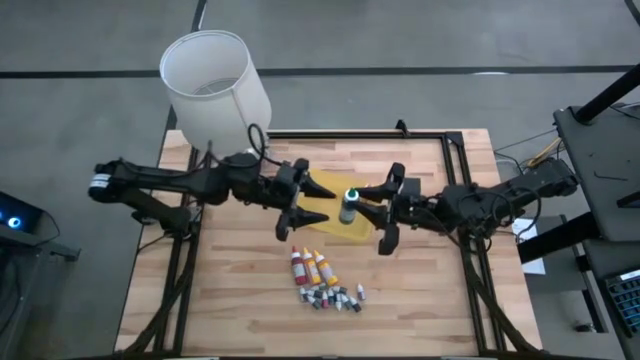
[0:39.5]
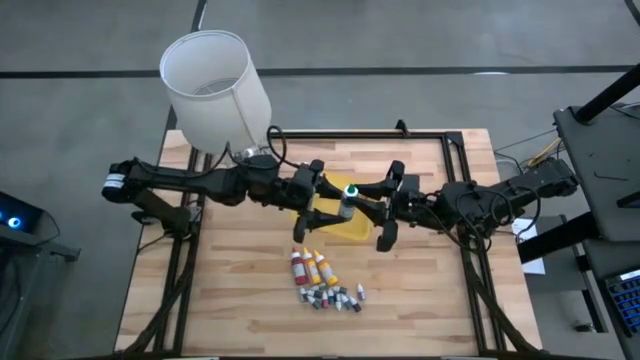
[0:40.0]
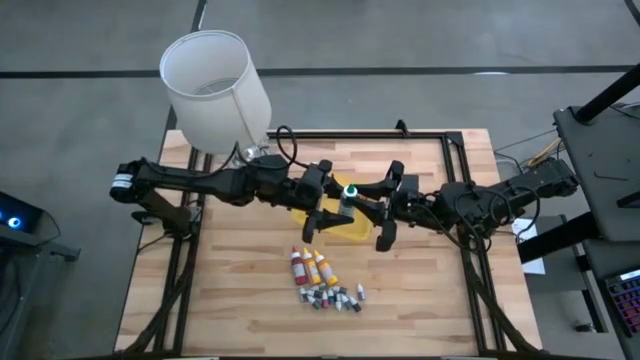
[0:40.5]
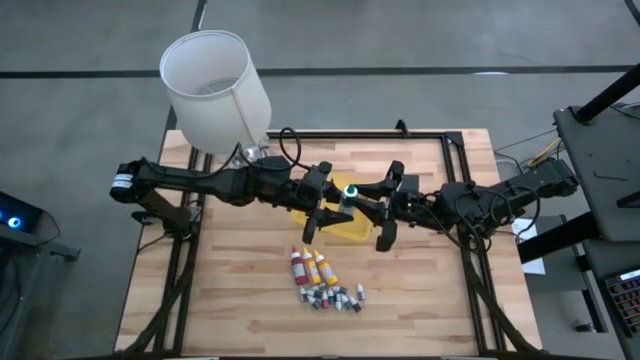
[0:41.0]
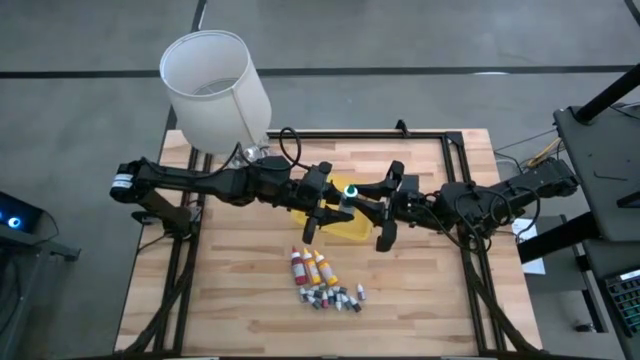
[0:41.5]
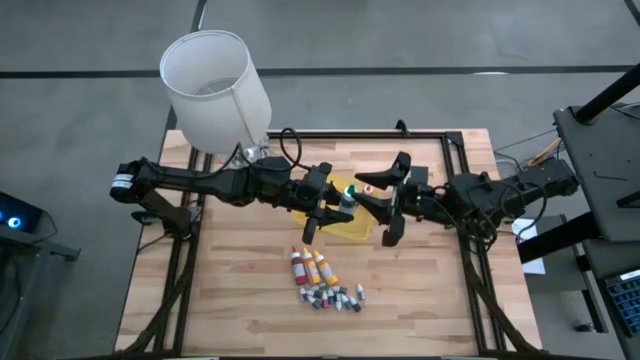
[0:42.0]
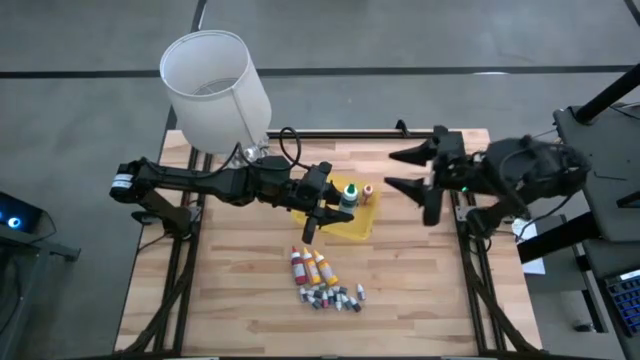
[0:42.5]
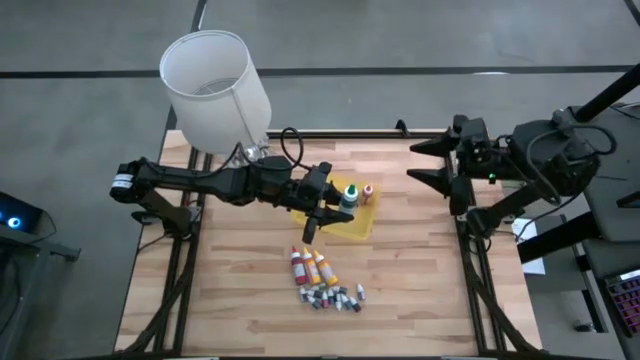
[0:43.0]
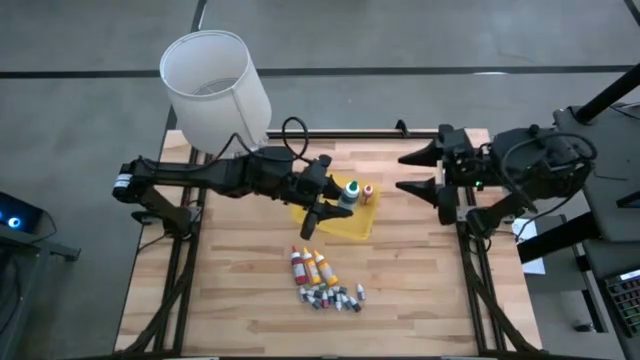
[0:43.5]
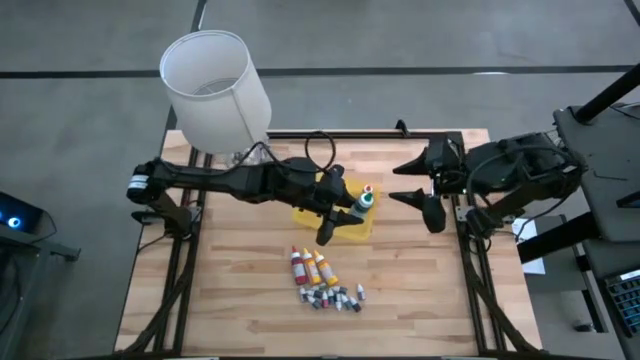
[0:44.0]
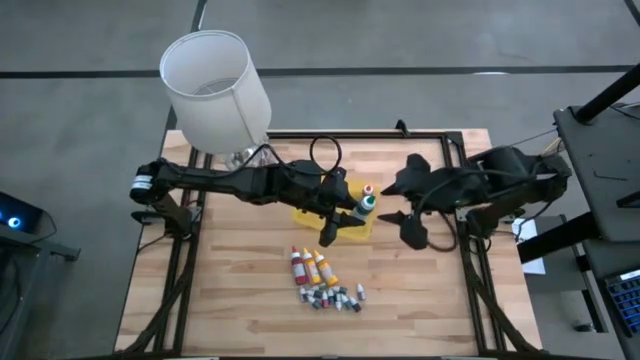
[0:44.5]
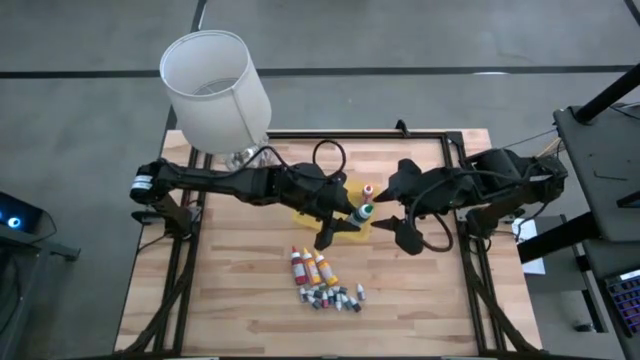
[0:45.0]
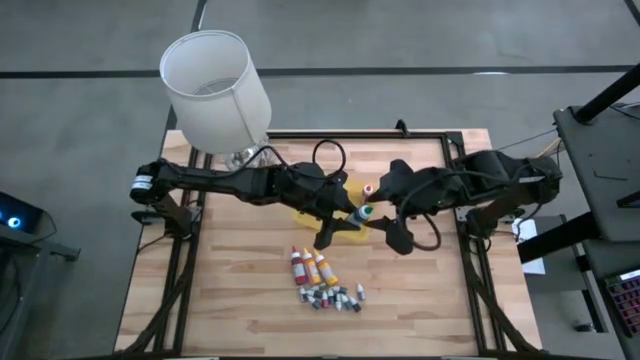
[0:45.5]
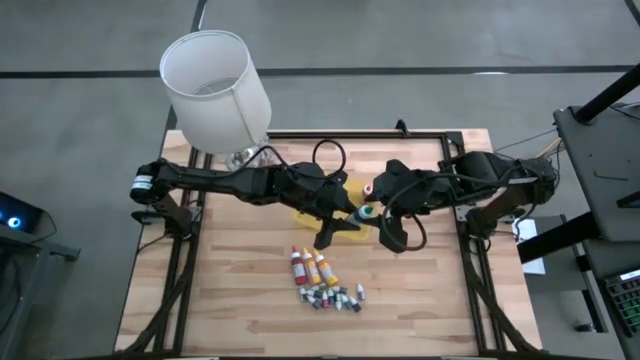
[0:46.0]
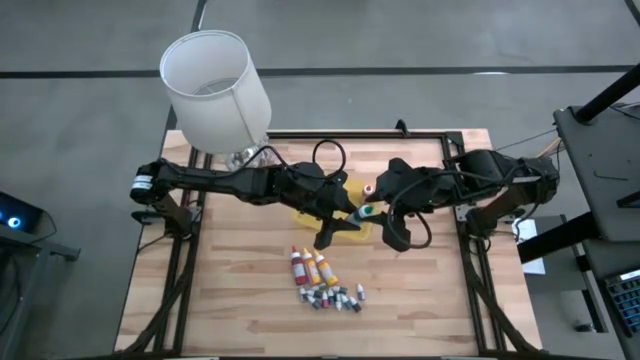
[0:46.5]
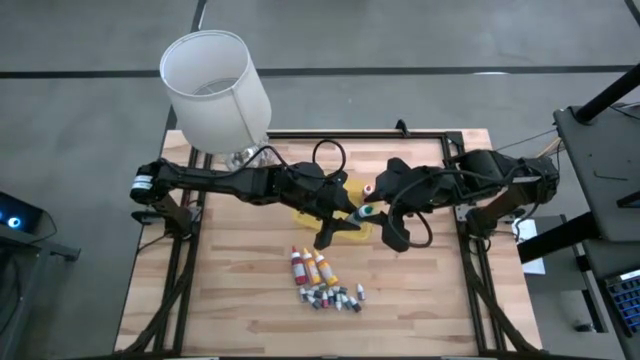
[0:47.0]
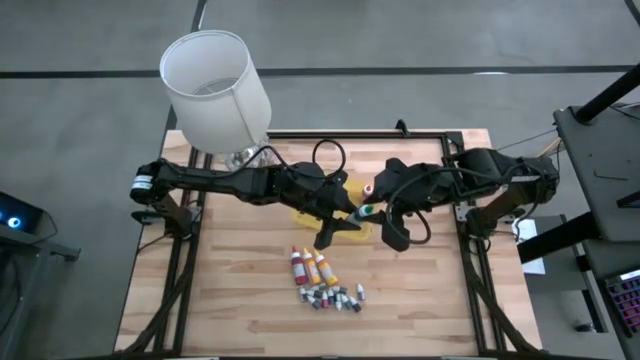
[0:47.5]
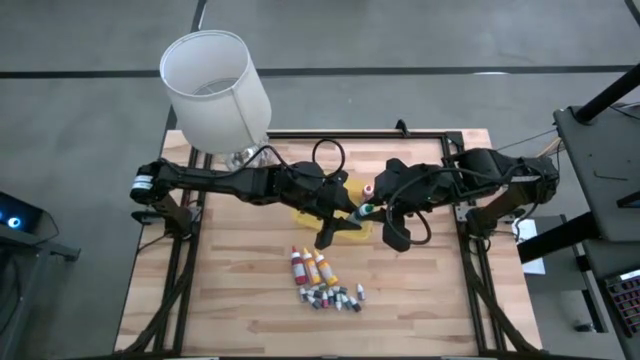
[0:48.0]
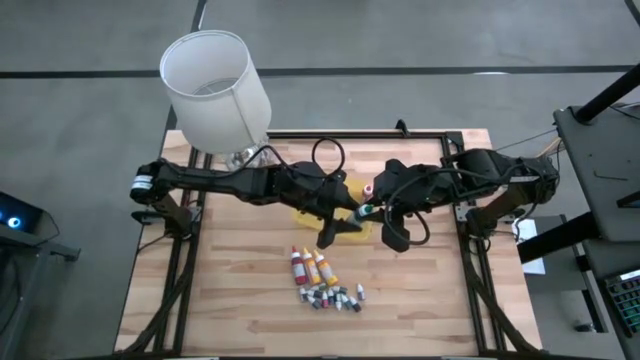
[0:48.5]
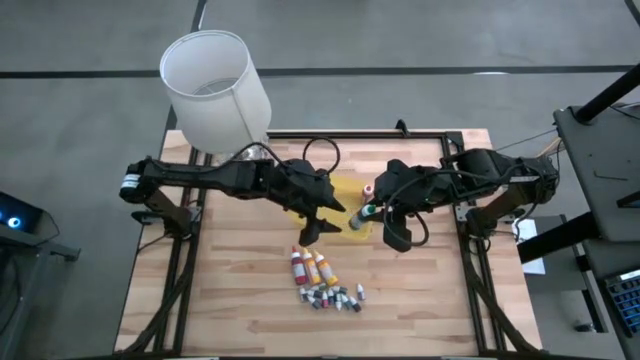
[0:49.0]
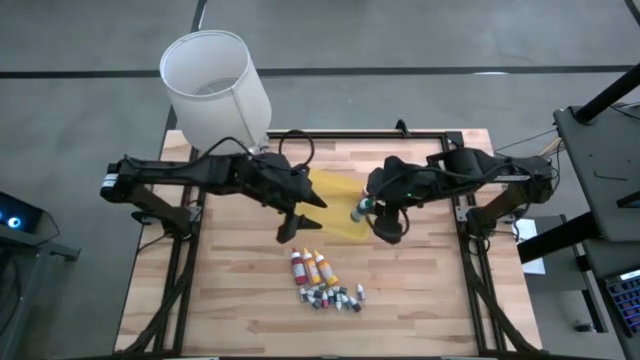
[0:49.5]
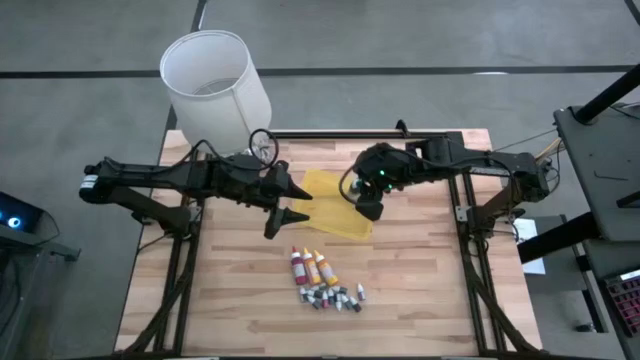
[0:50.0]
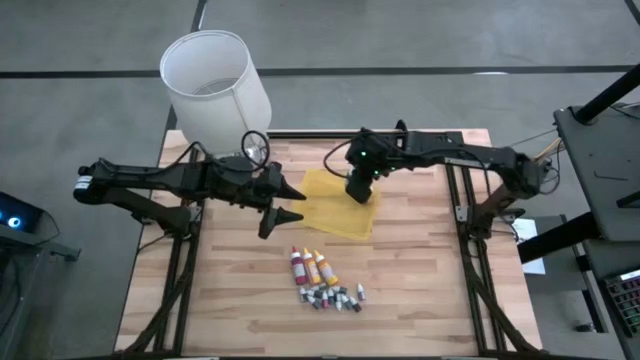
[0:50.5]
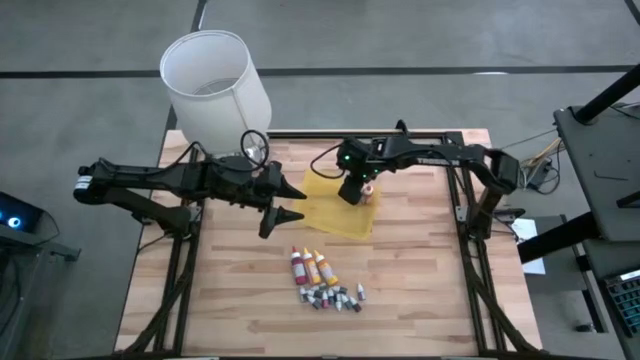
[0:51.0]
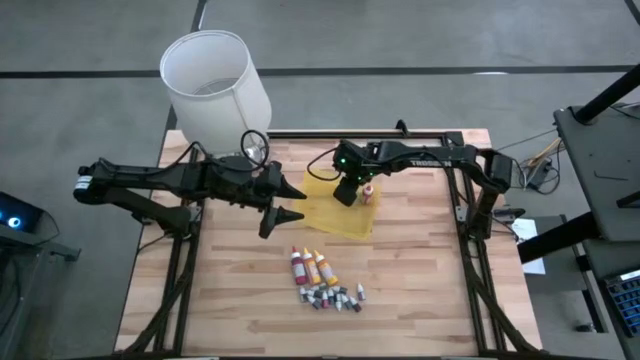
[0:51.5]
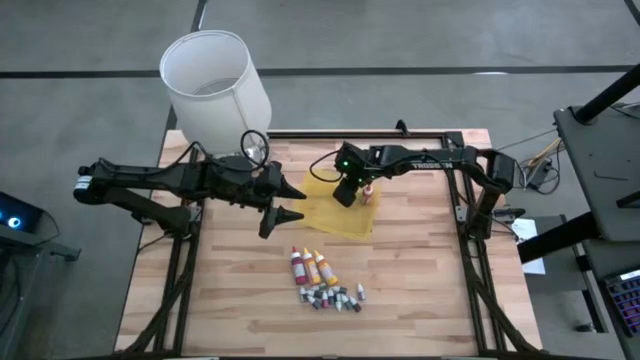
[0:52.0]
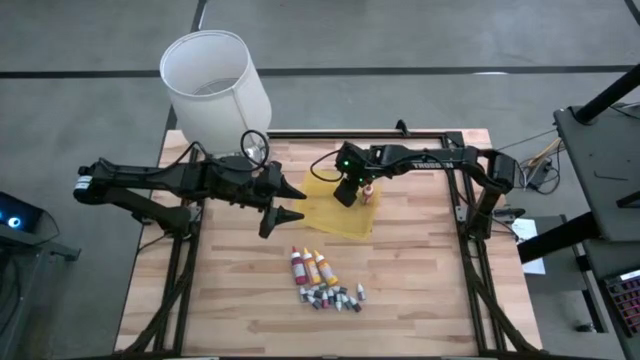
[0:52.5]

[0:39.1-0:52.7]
Task: Pick & Place food coloring
Put the large green food coloring bottle into the yellow bin

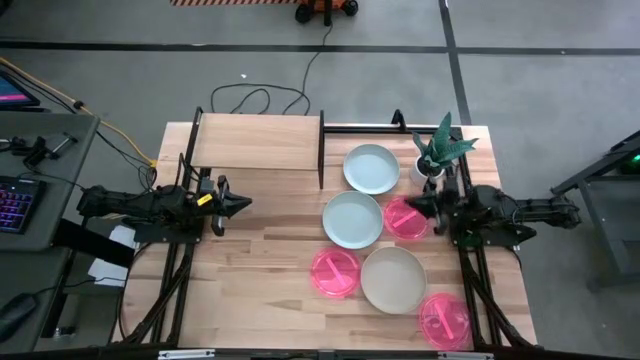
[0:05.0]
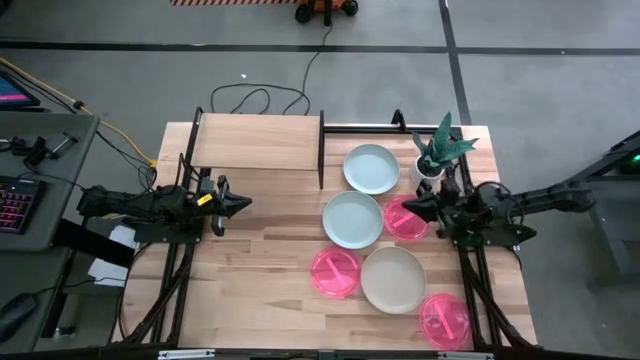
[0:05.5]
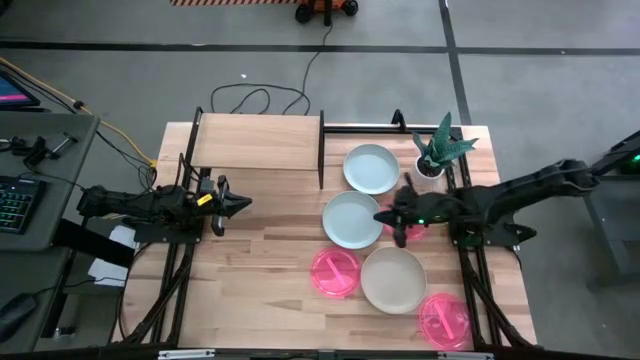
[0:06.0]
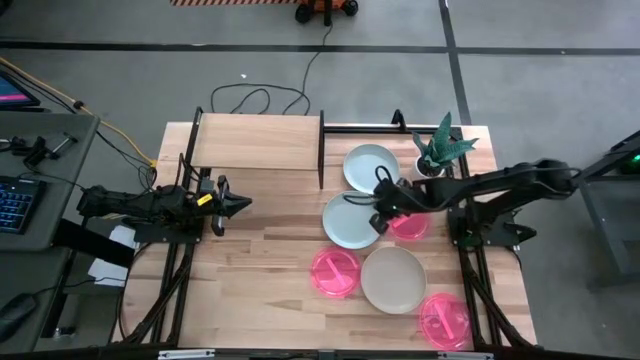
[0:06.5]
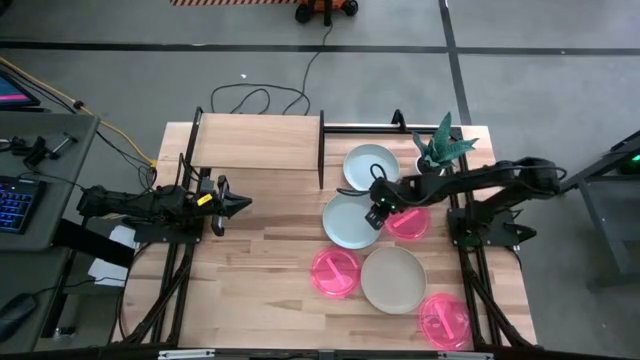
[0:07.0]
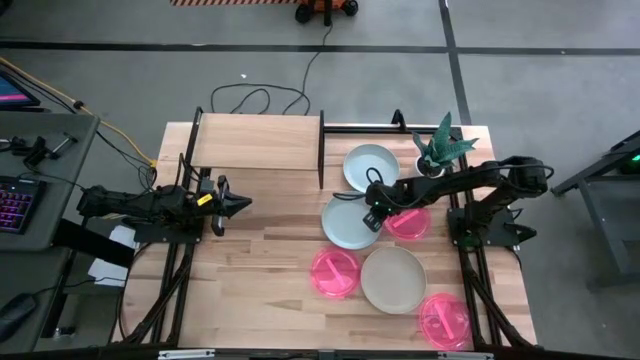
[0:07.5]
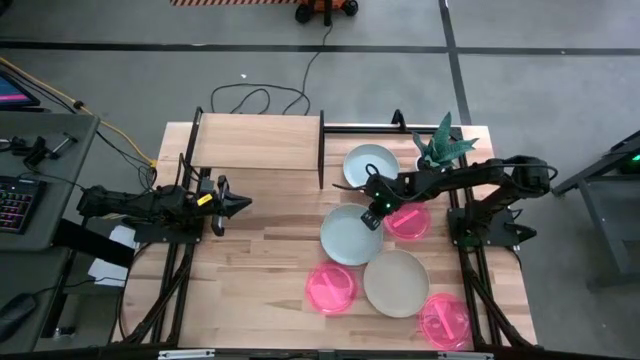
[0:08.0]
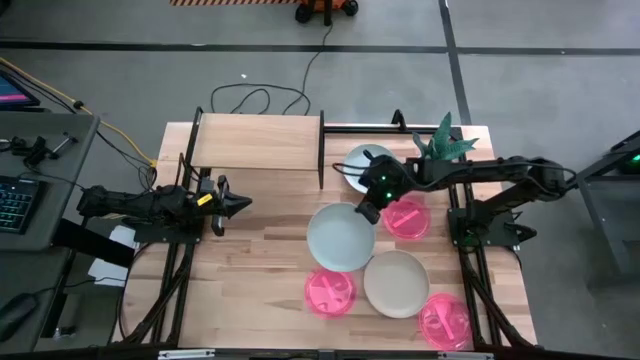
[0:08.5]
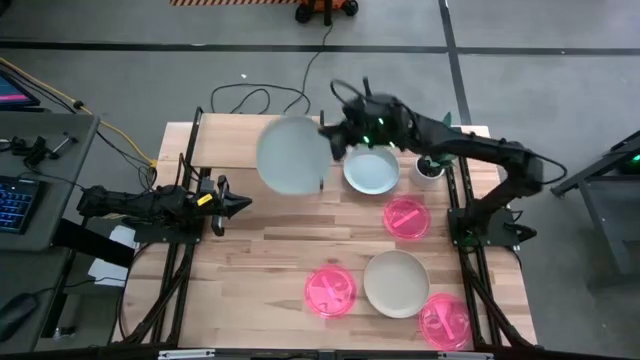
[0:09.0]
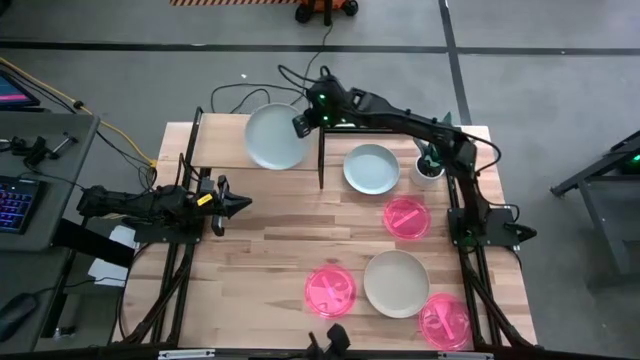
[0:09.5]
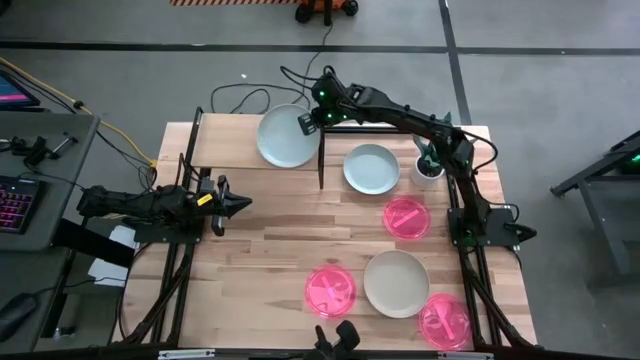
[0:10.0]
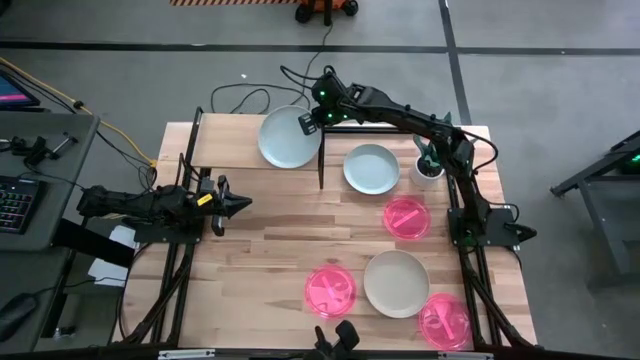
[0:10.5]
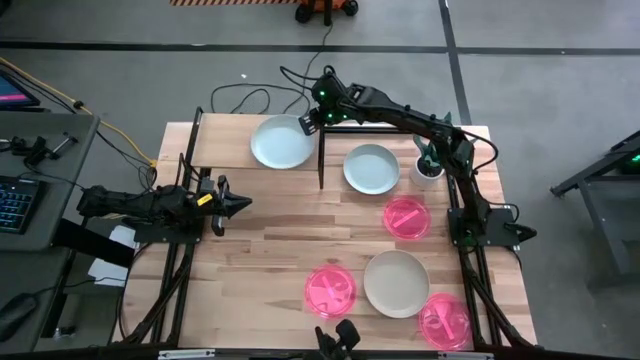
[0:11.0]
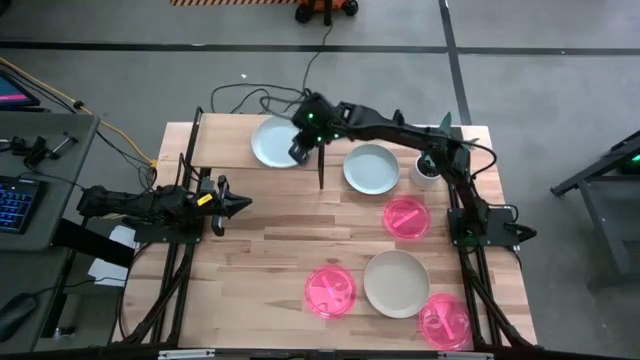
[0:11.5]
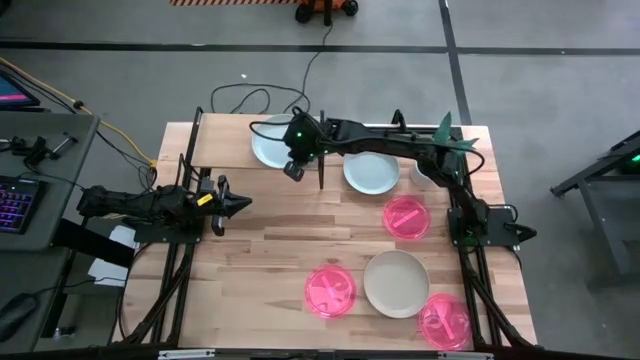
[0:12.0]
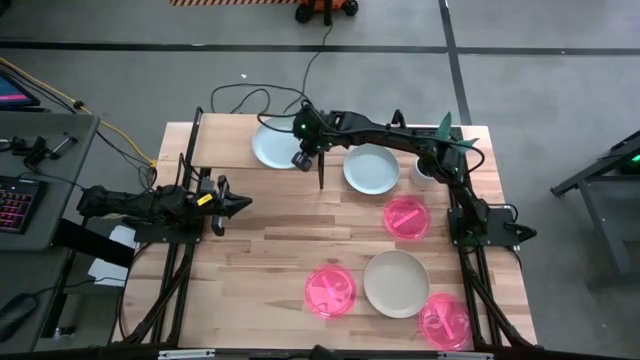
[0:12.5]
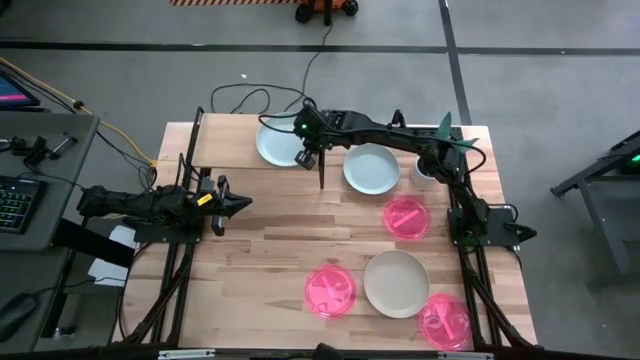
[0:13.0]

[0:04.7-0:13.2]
Task: Place and stack plates onto a shelf
Put the bottom white plate on the shelf
